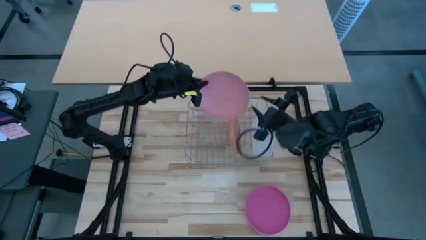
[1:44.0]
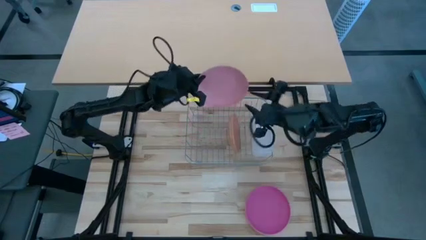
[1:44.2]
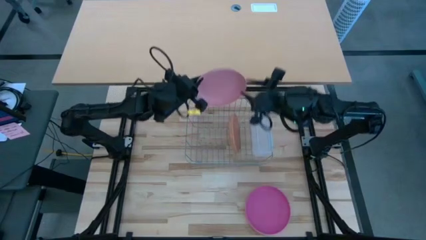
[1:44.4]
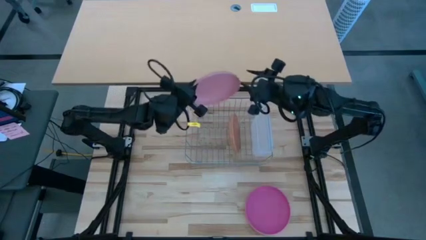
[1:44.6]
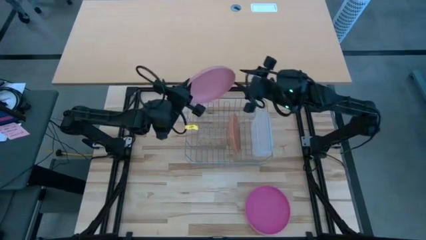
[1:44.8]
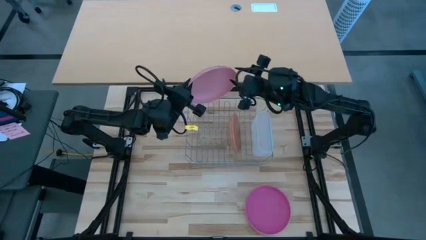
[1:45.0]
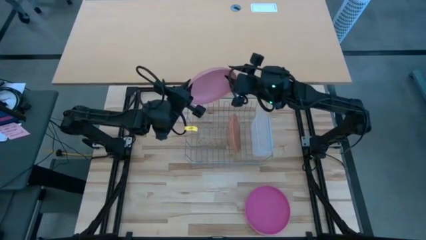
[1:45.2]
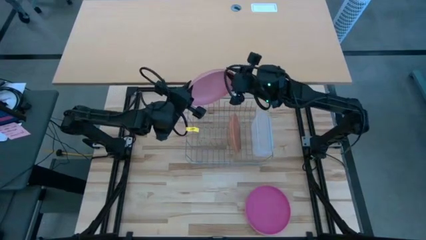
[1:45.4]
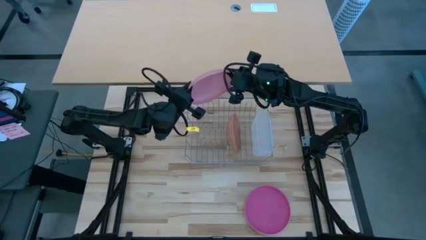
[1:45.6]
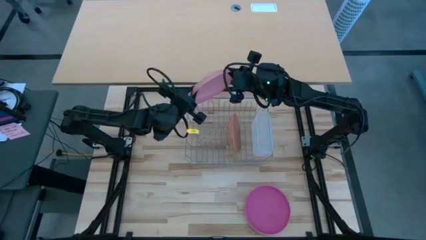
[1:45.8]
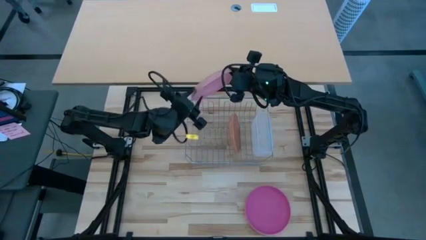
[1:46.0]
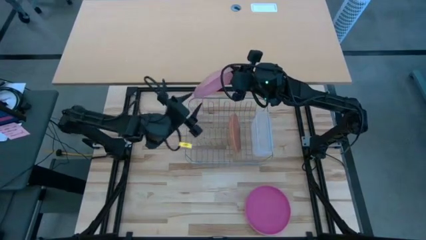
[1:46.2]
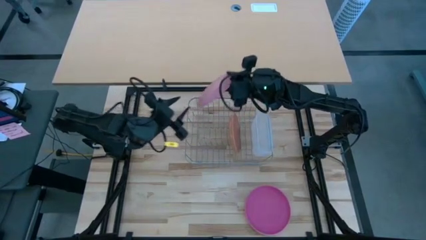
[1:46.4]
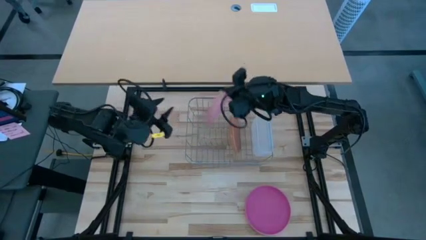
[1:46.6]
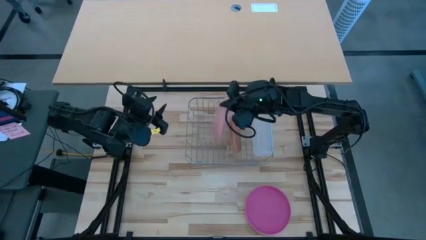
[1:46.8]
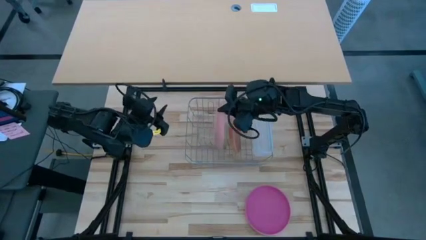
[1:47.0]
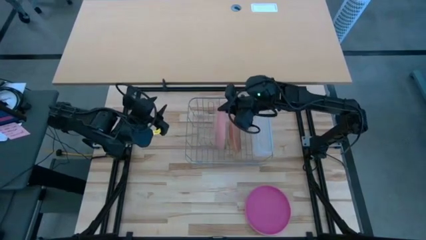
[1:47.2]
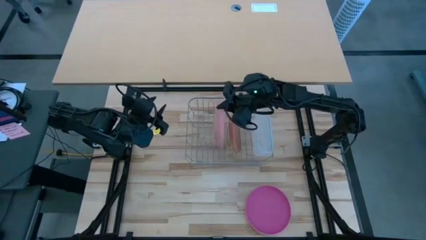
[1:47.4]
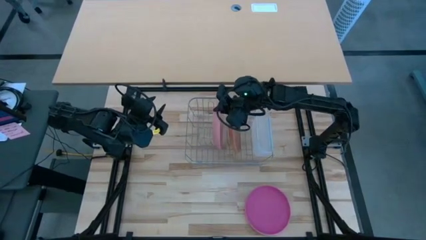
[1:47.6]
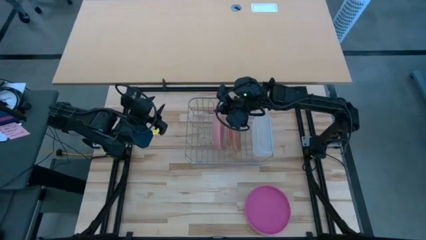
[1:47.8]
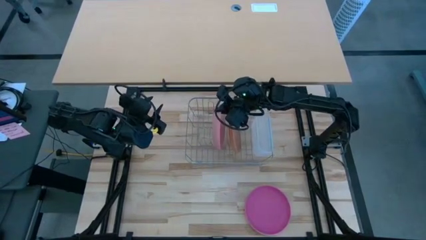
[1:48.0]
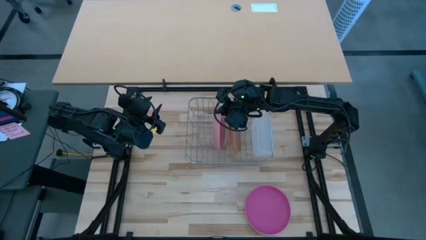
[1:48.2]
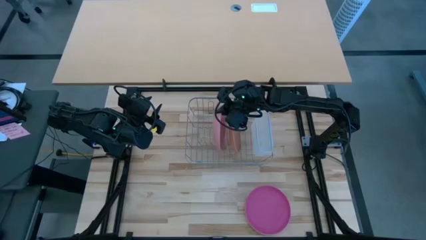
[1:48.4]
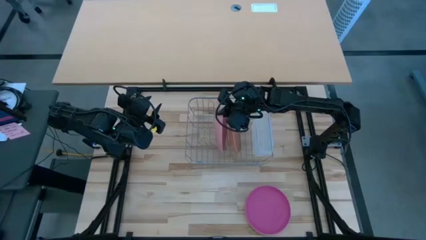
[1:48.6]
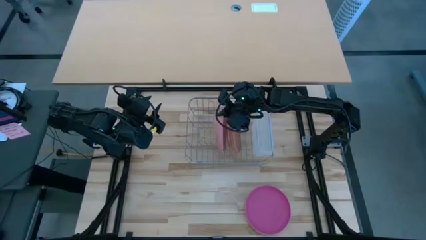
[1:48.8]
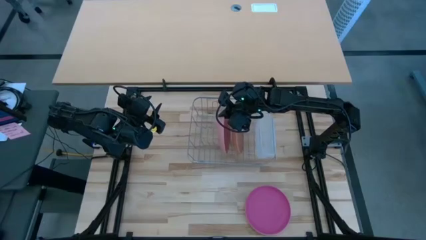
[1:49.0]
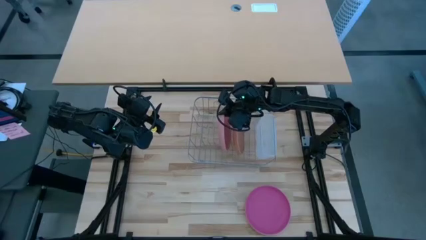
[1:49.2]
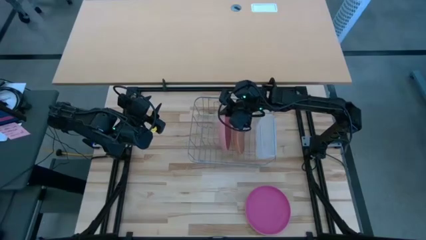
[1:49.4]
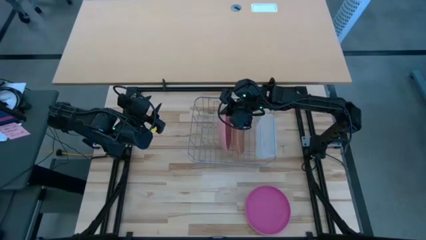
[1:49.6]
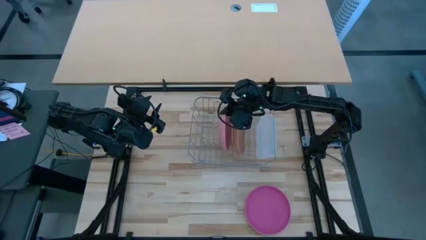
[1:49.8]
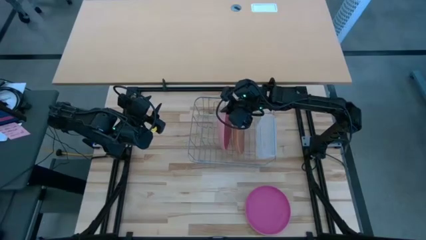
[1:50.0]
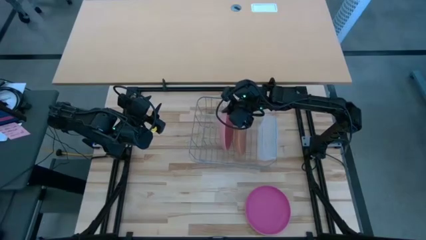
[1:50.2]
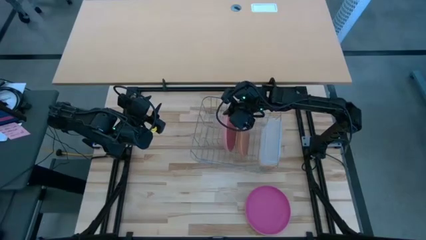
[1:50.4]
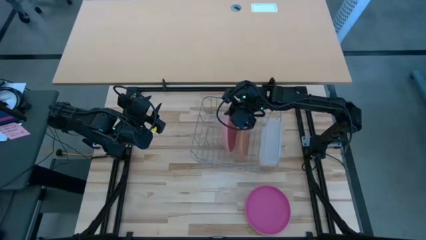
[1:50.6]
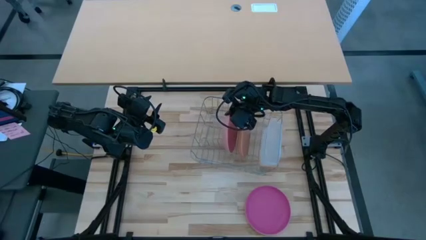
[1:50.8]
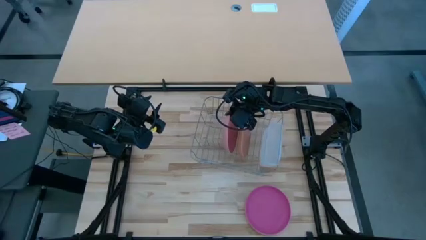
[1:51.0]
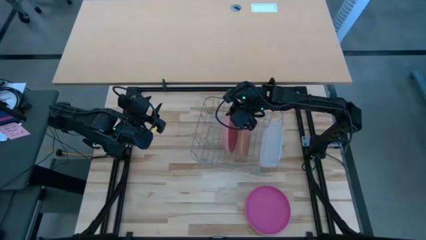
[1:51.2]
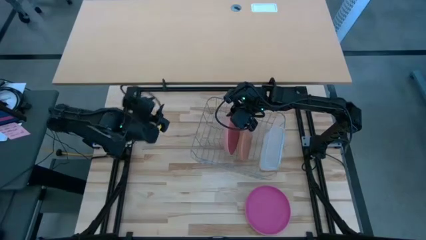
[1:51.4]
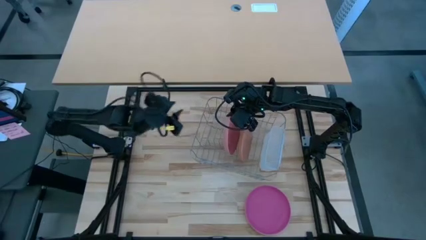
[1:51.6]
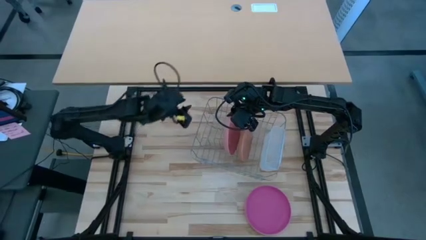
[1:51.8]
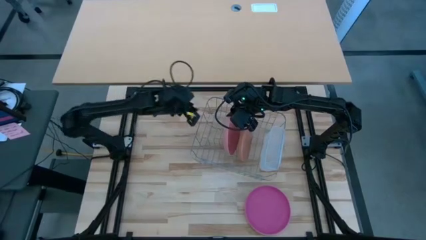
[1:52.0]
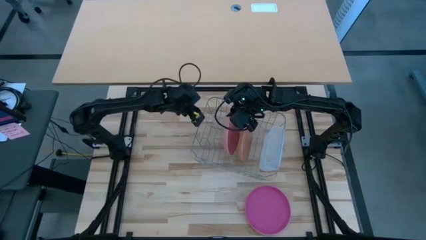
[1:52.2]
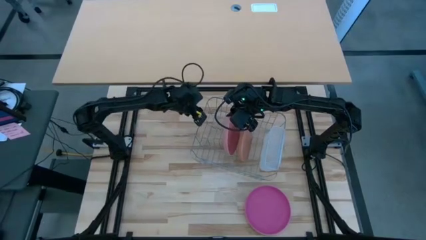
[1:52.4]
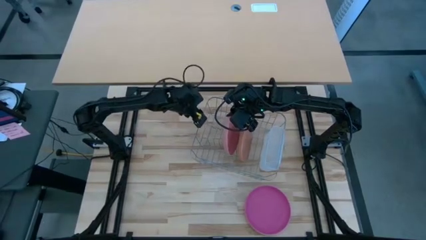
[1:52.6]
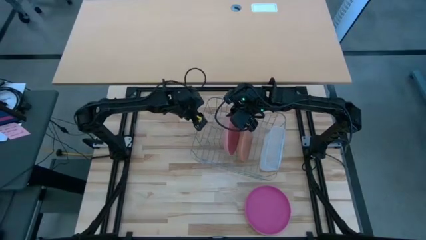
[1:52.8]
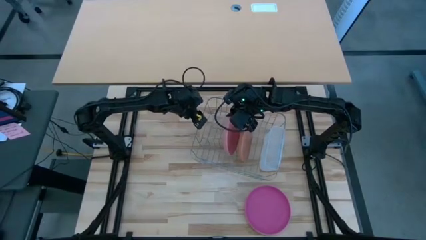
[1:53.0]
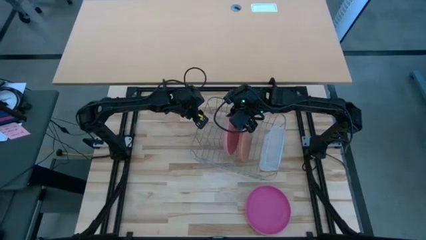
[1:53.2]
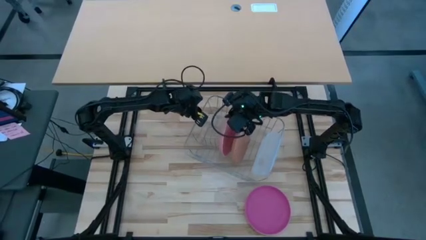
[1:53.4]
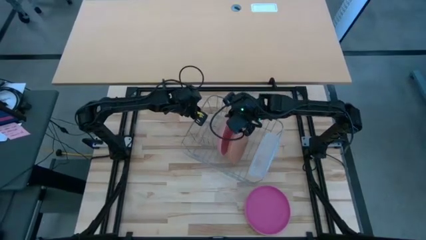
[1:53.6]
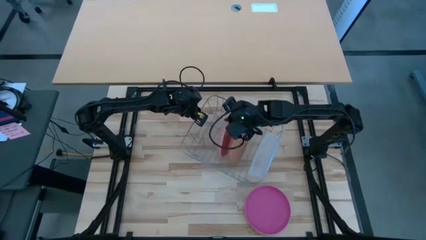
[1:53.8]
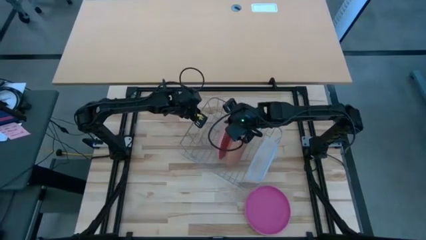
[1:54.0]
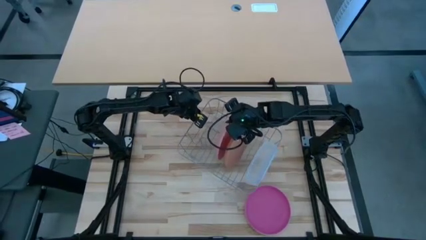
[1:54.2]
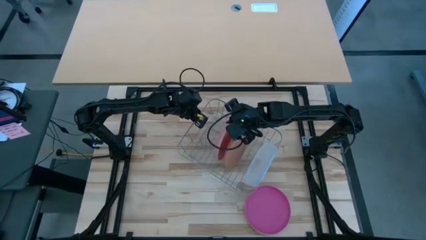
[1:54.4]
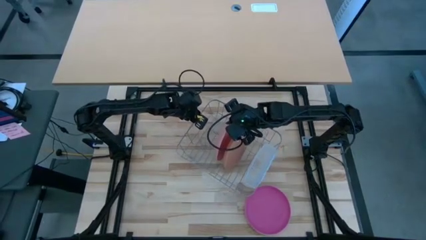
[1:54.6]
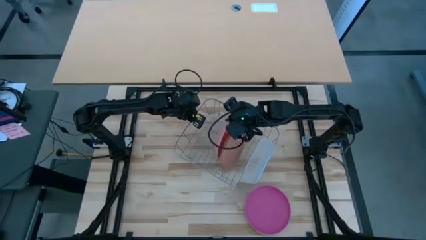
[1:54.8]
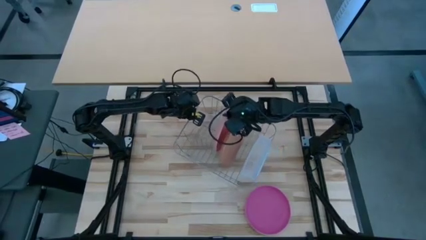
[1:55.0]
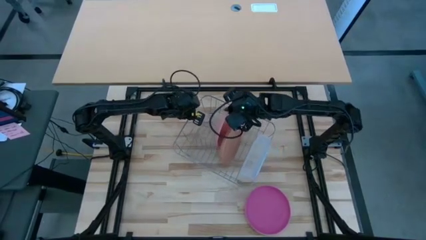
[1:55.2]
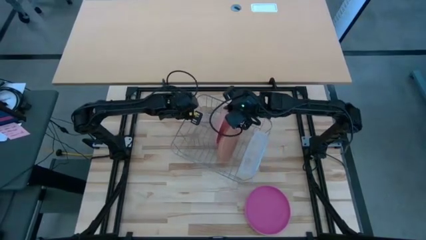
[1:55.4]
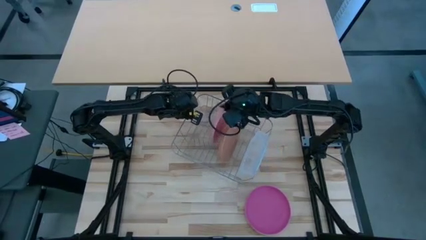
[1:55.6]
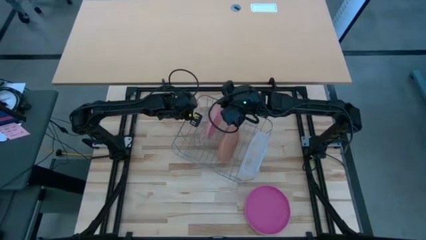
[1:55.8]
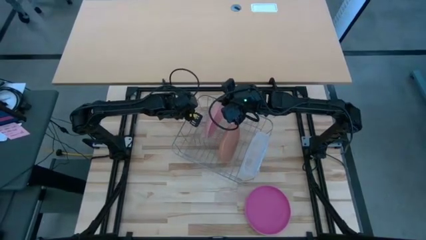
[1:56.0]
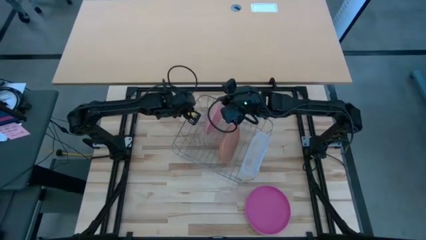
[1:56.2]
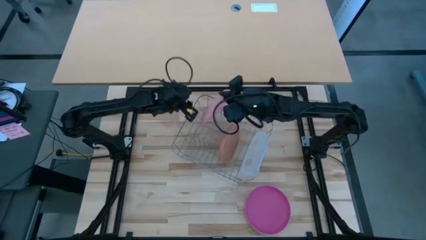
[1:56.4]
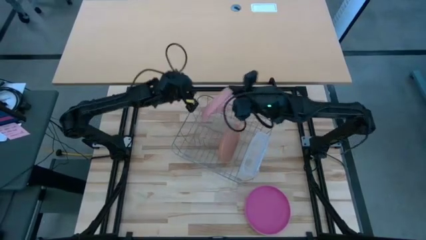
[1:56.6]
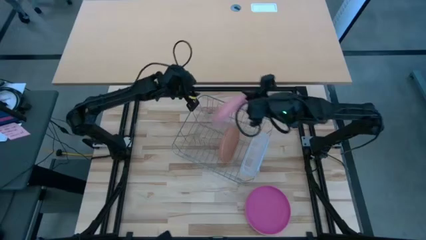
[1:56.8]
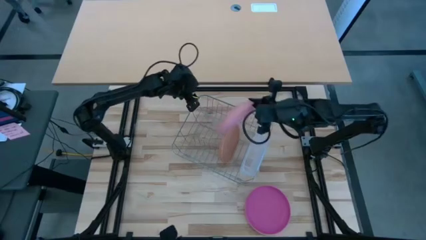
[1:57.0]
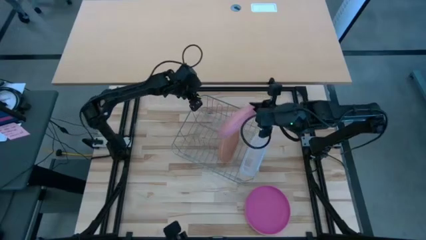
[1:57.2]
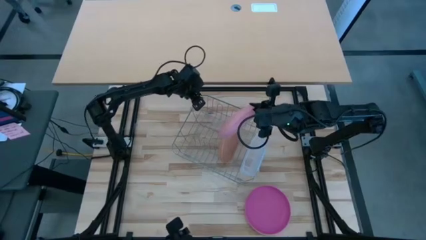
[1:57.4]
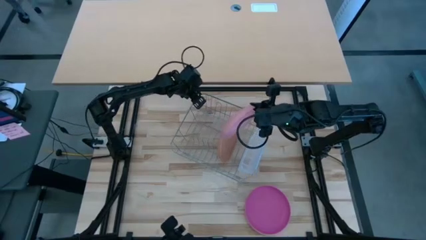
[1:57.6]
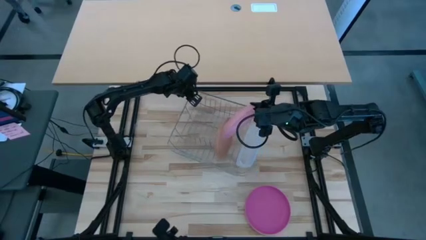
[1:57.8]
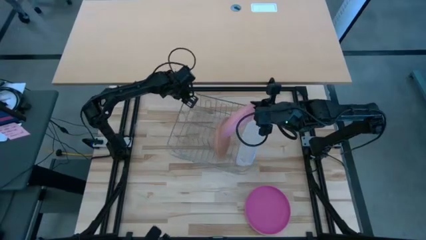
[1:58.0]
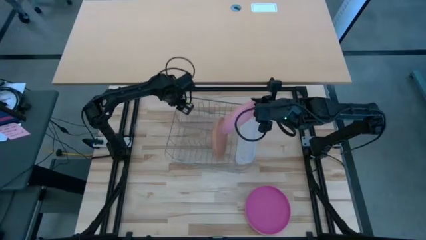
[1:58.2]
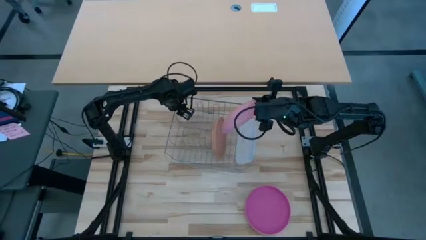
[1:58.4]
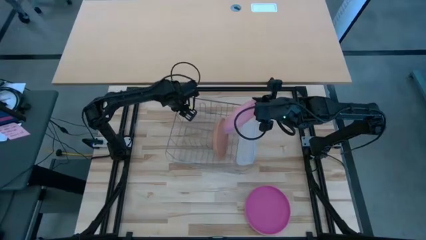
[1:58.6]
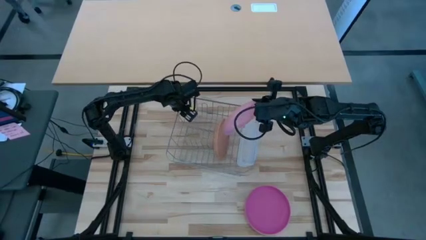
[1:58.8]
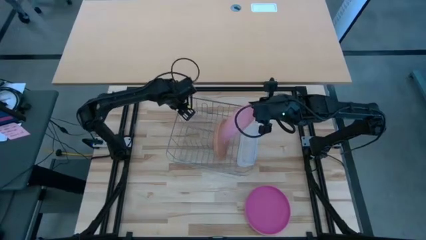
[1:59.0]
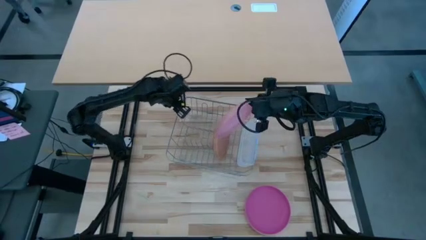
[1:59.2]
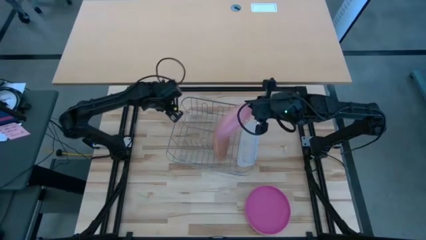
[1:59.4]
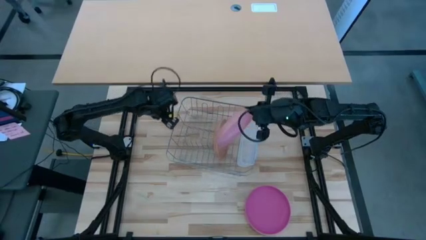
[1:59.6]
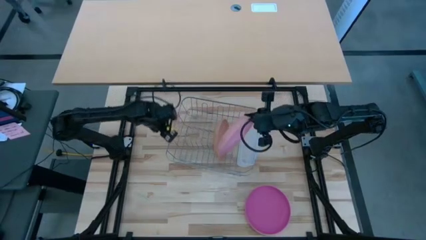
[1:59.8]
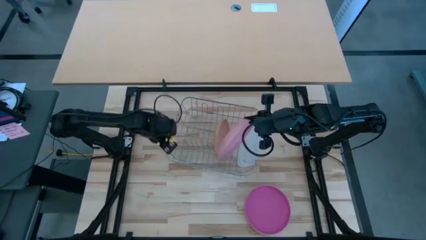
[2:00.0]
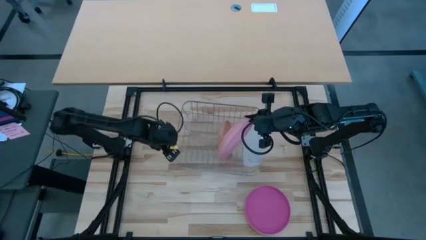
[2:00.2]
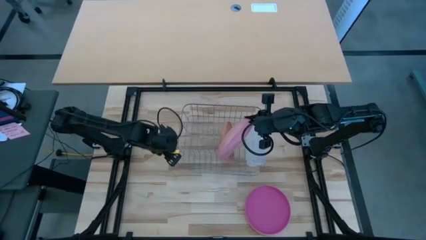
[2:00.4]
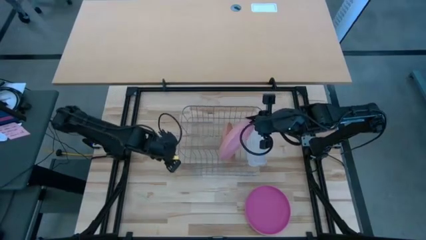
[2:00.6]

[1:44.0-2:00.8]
Task: Sort dishes
Put the light pink plate in the dish rack
